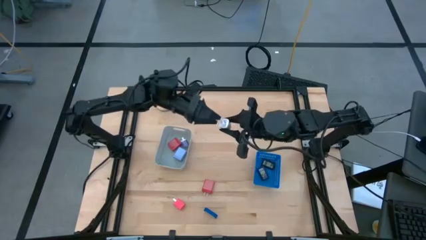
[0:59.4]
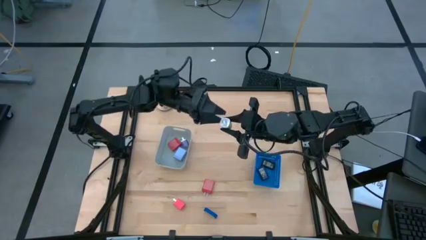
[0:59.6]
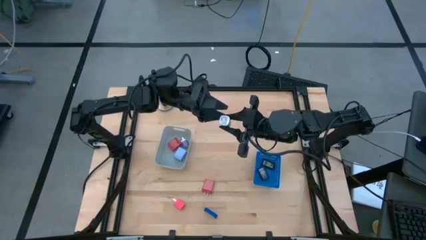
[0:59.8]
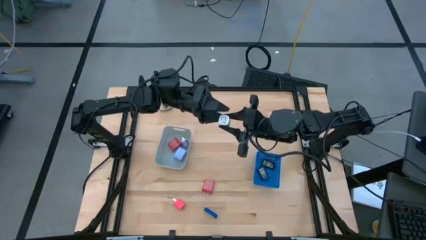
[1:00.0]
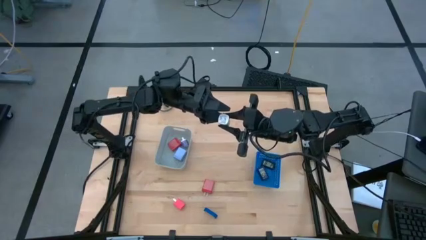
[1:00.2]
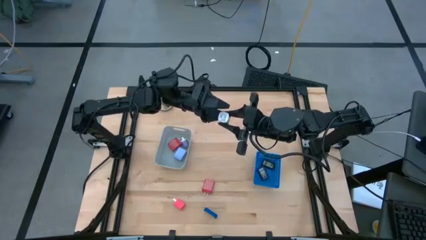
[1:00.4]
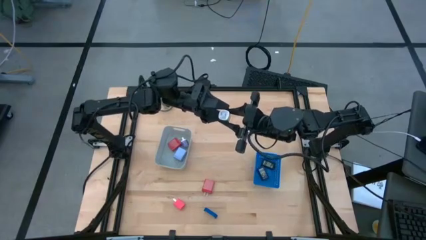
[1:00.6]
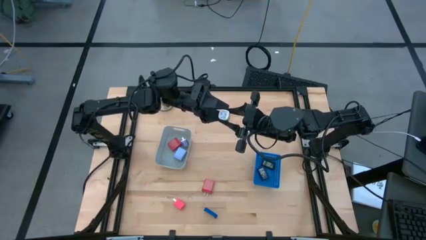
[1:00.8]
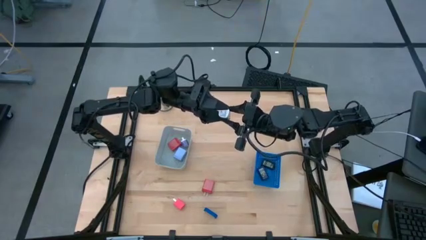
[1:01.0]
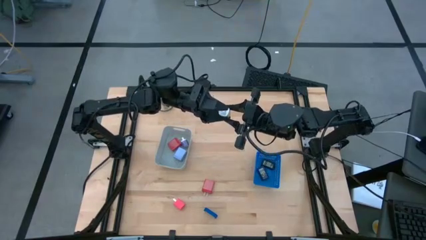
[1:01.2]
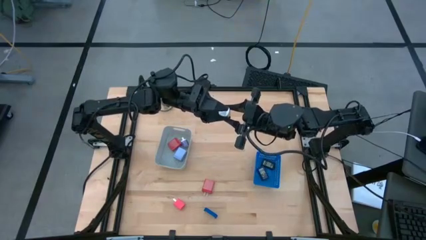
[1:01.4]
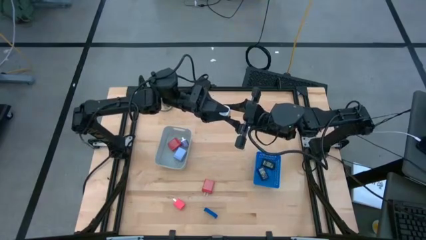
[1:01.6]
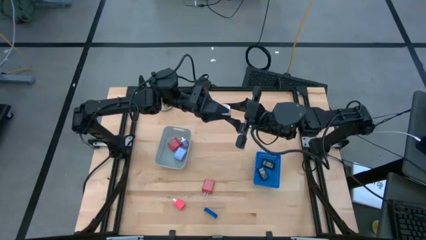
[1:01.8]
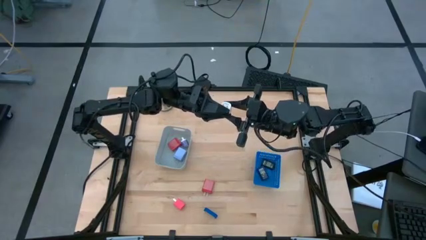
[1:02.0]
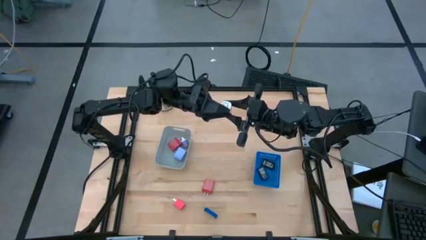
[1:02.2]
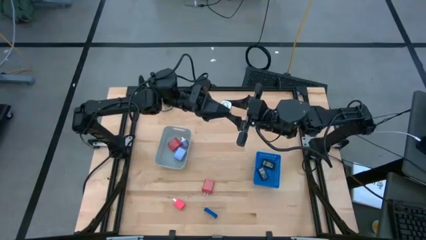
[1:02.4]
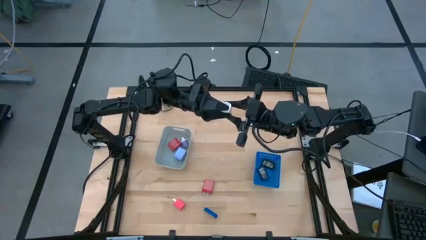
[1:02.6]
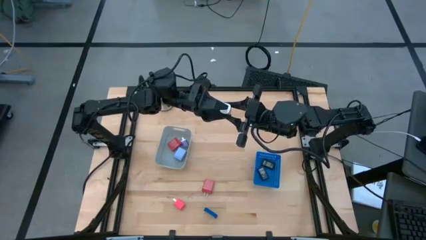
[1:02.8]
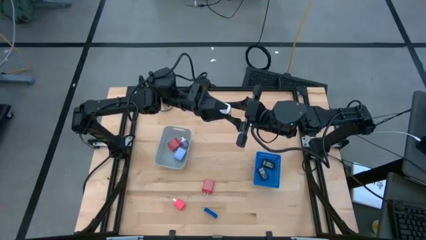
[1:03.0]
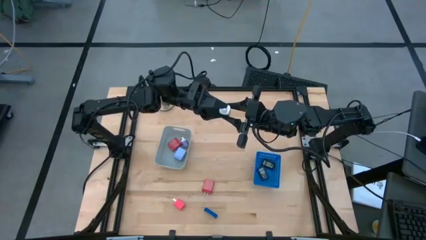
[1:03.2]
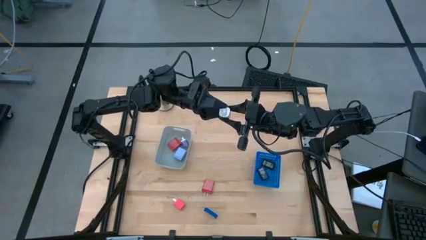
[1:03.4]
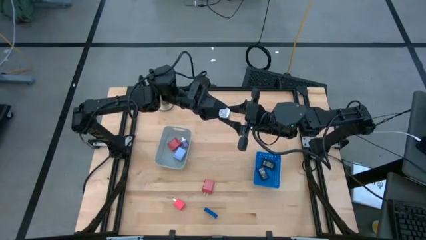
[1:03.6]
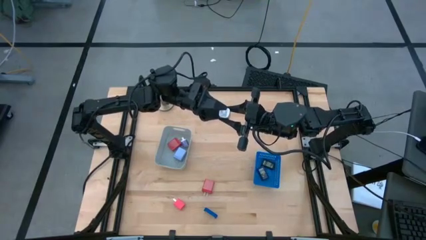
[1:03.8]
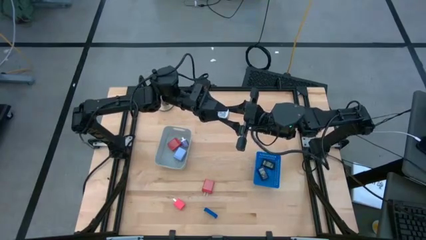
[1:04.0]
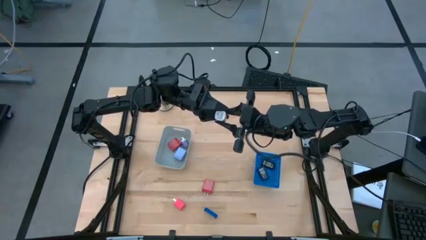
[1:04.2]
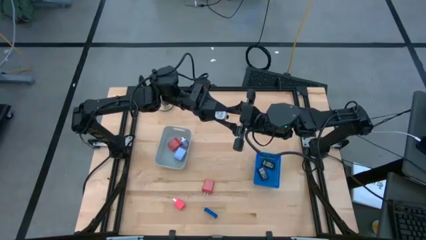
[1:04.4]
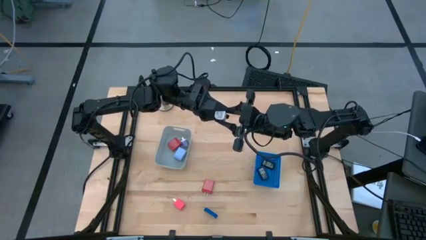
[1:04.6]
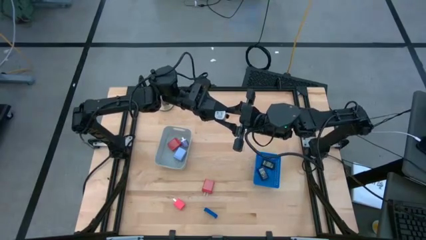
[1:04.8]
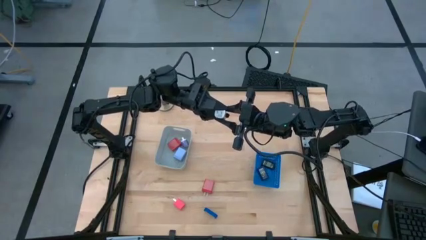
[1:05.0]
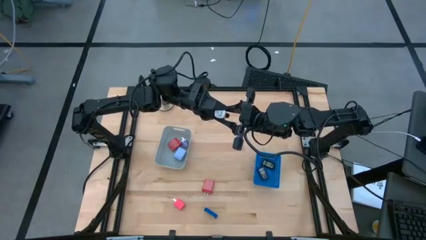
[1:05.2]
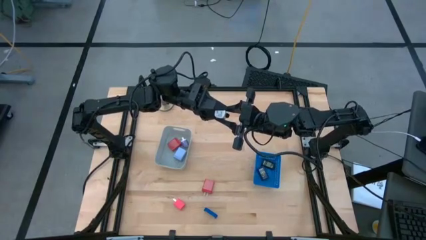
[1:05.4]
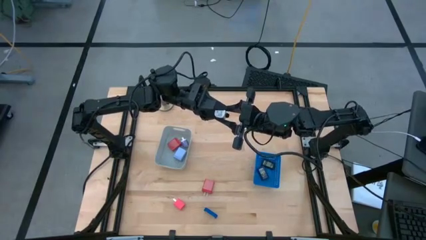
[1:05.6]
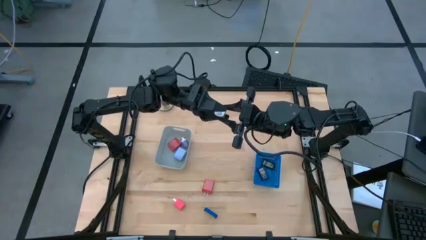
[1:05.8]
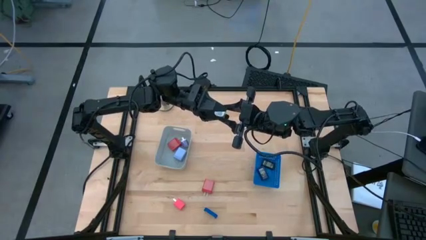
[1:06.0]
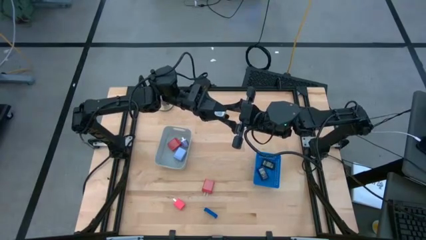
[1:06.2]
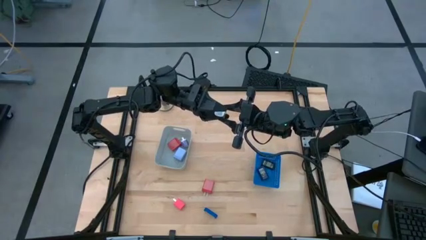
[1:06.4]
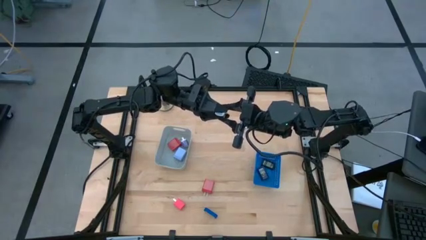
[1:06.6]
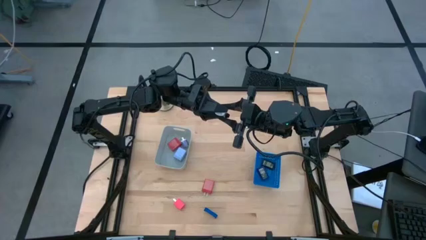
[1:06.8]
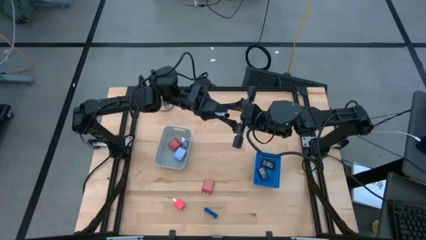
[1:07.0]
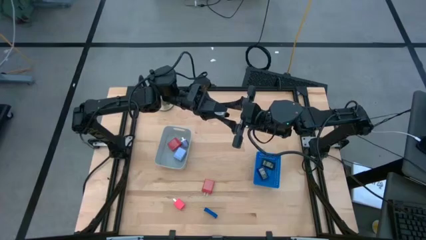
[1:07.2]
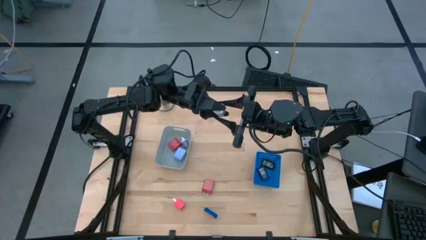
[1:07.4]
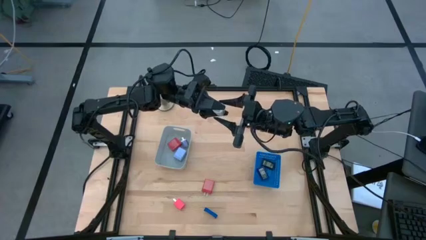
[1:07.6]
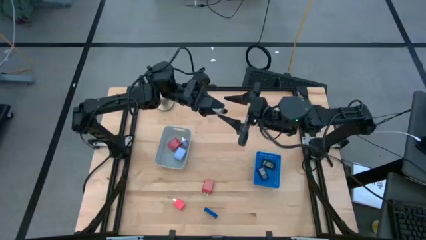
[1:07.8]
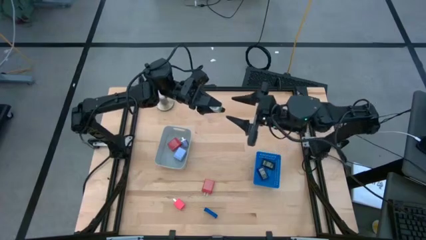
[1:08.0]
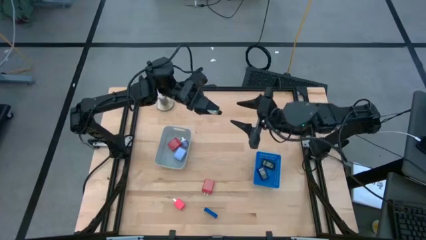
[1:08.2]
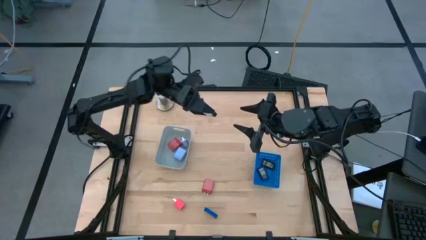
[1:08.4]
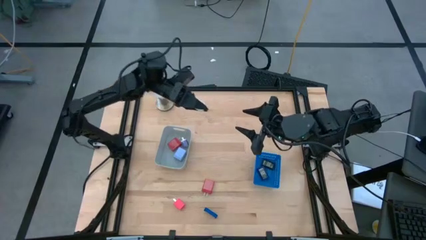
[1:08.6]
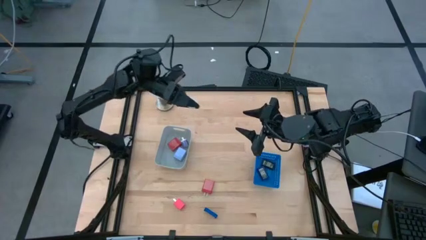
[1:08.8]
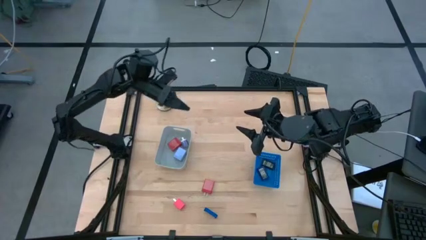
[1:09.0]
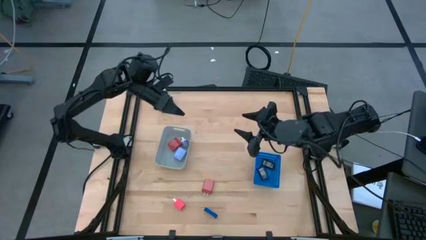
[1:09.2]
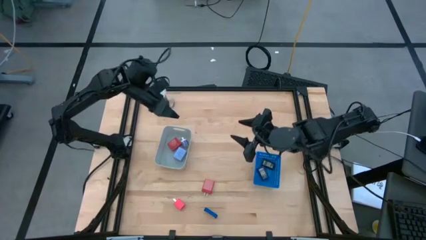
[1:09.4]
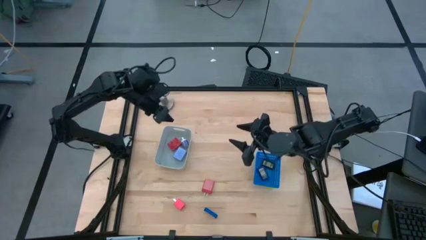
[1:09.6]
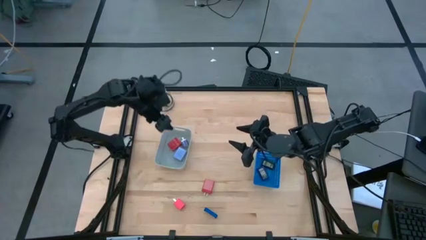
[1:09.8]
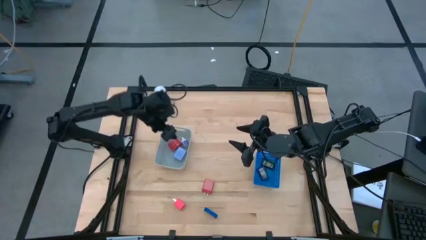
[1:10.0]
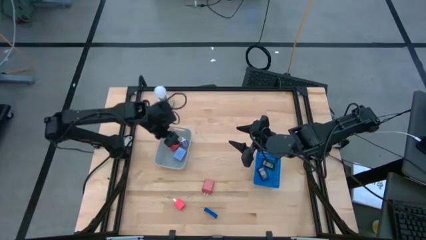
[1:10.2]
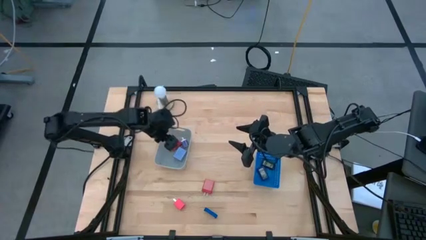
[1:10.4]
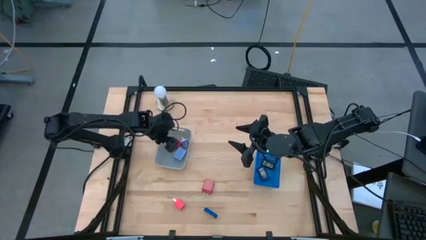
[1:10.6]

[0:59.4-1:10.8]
Task: Pick & Place Office items
Put the green charger adapter into the gray bin

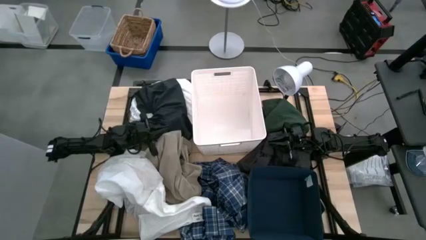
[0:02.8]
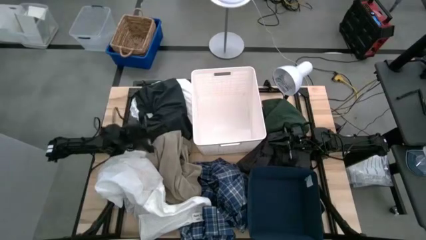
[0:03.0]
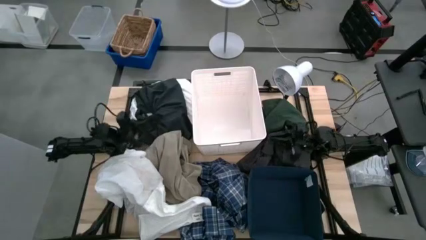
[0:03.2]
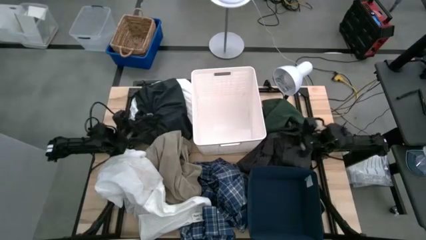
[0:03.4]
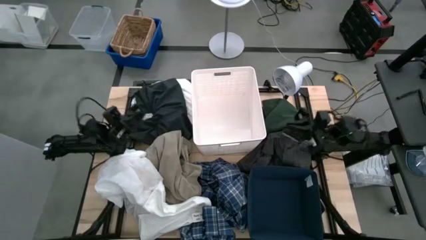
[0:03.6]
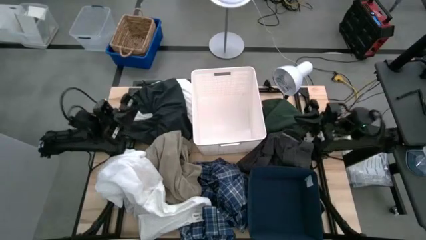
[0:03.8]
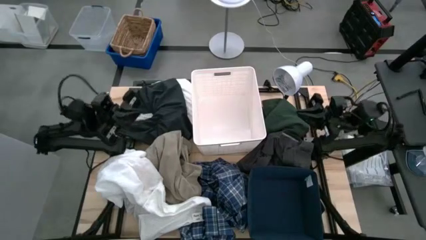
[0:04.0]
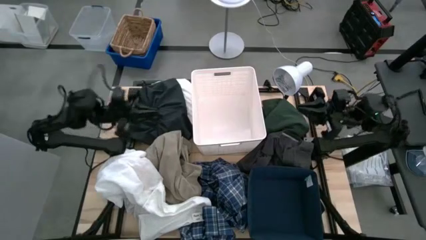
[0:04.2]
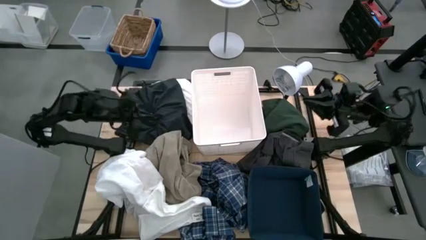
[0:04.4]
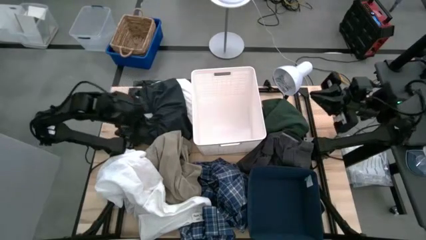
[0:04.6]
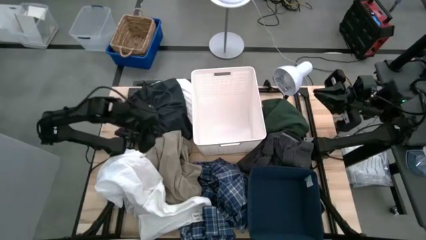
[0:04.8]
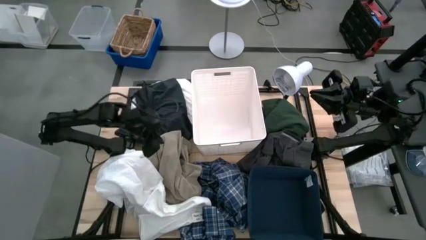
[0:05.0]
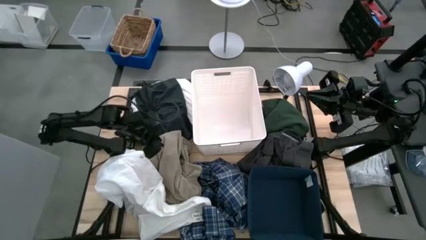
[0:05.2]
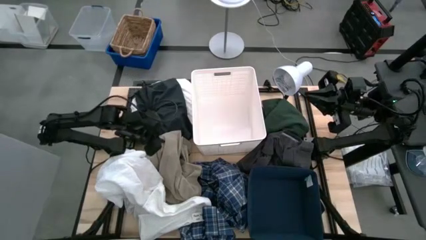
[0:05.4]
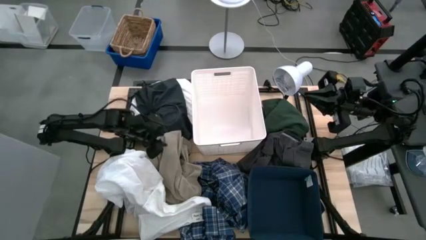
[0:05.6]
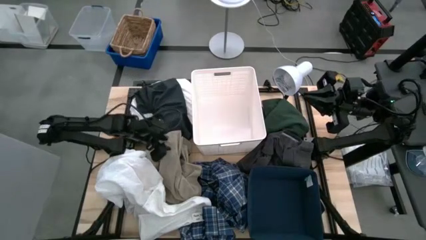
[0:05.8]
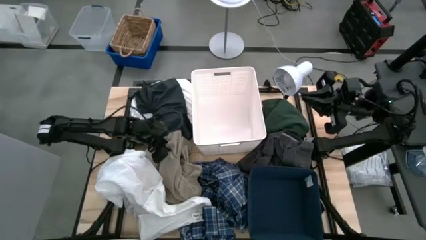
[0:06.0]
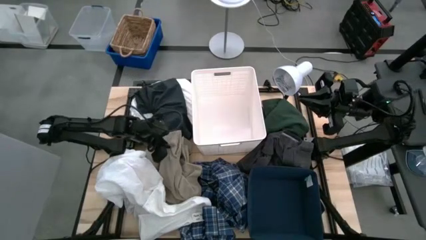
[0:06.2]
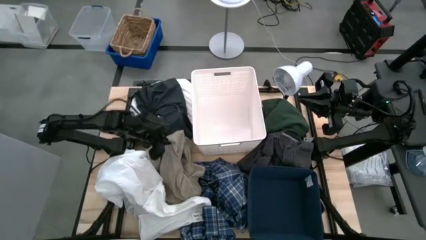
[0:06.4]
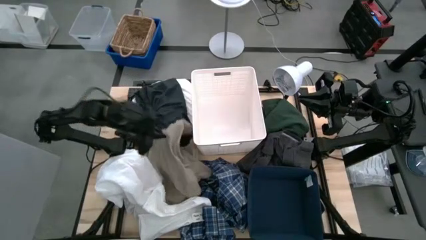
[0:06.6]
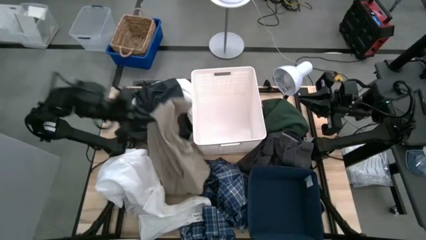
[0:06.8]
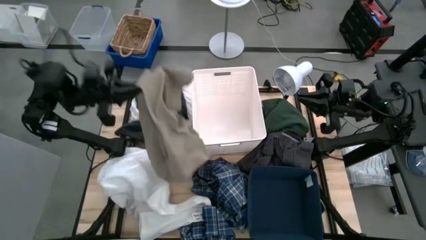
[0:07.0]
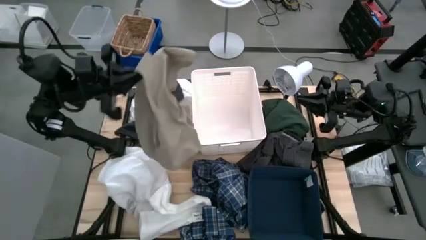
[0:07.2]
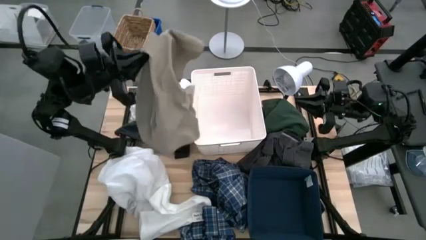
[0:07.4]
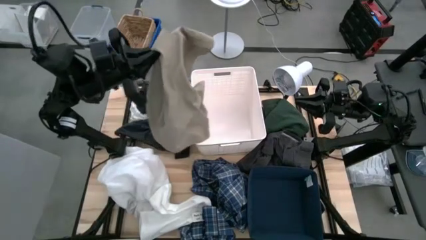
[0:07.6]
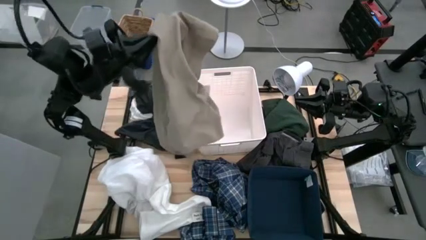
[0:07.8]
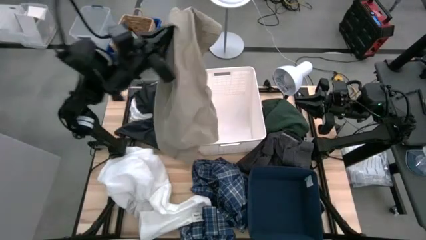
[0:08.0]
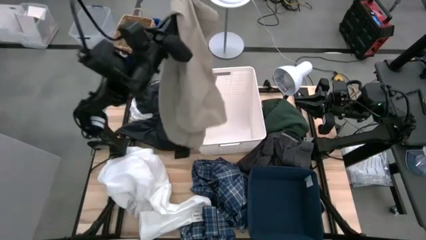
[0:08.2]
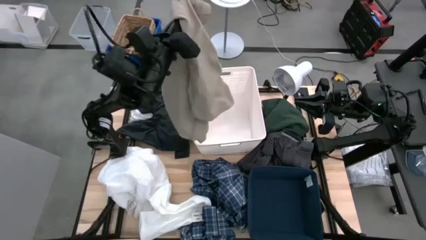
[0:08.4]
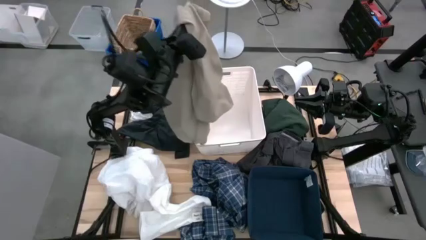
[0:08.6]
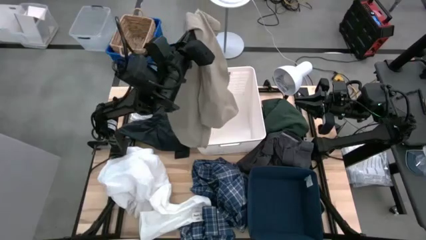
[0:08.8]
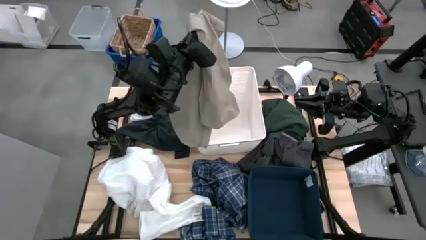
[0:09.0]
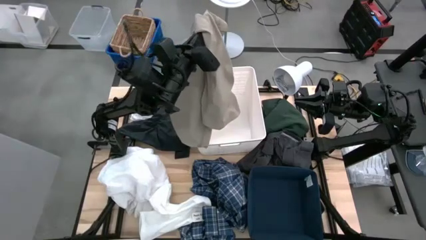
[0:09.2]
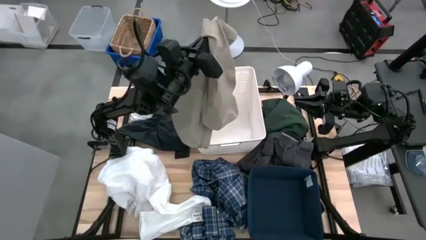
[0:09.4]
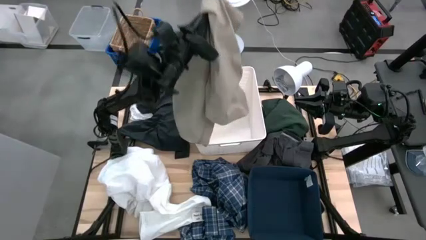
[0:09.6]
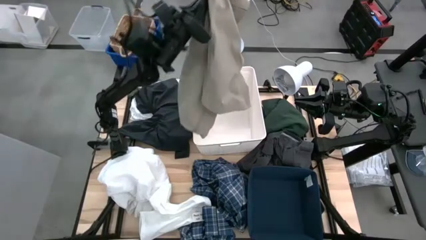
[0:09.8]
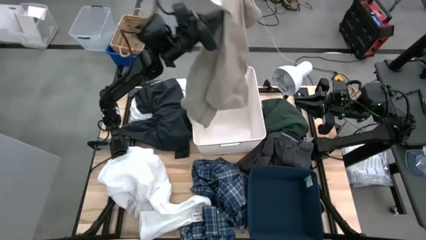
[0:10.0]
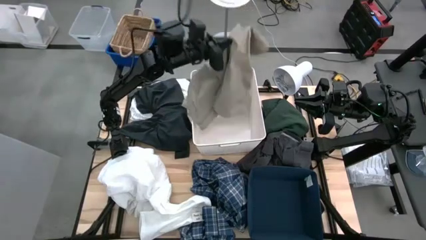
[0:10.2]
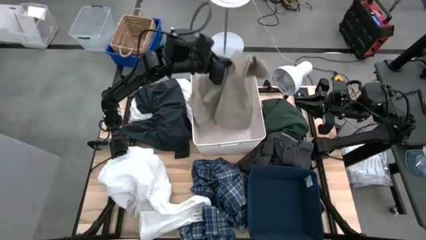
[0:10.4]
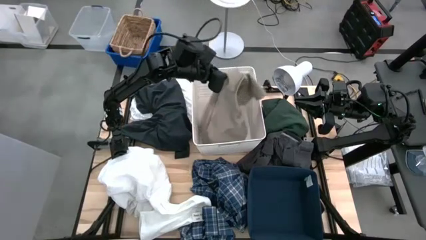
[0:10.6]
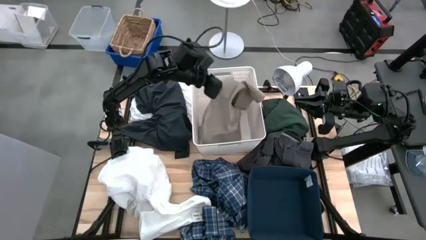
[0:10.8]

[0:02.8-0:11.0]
Task: Sort clothes
Put the brown shorts into the white laundry bin
